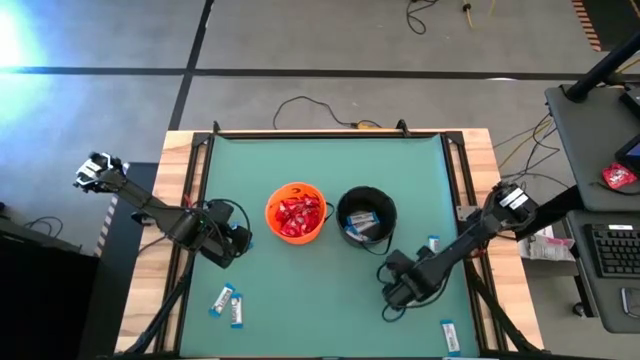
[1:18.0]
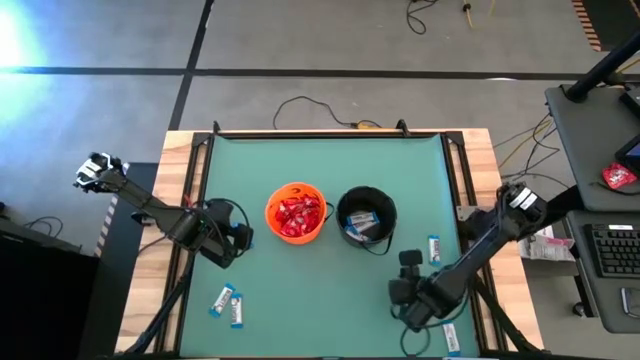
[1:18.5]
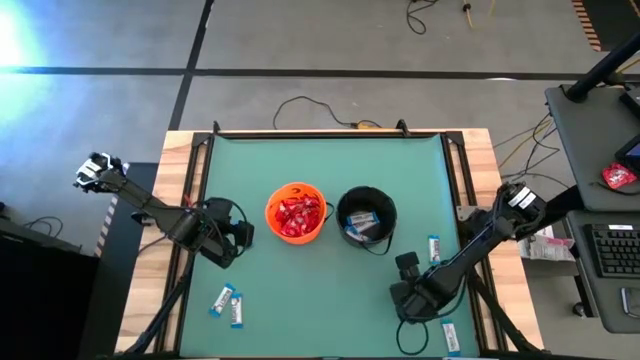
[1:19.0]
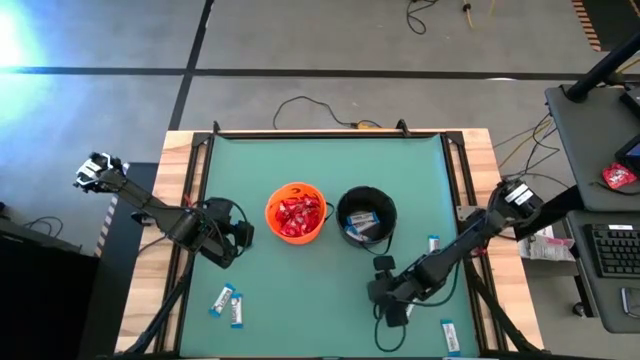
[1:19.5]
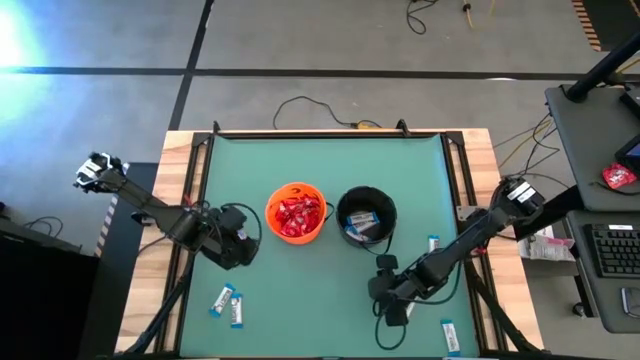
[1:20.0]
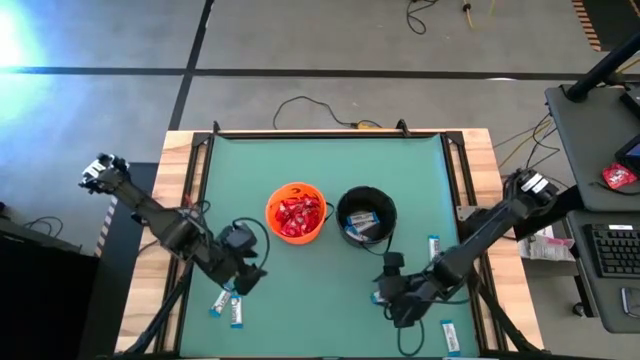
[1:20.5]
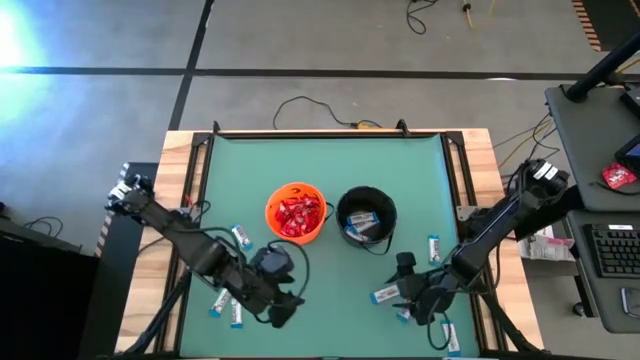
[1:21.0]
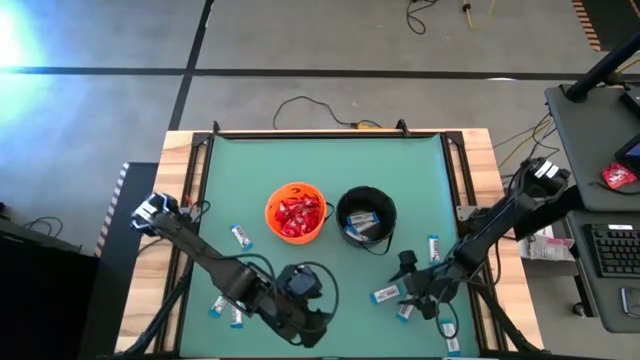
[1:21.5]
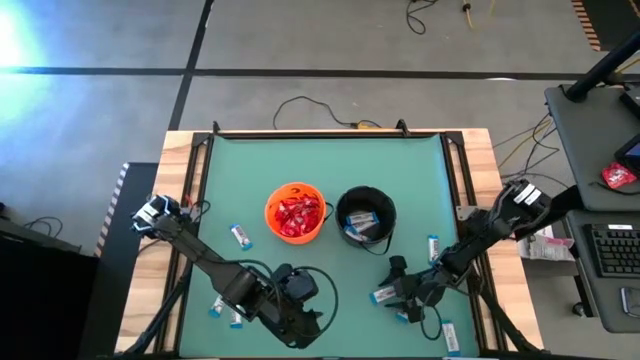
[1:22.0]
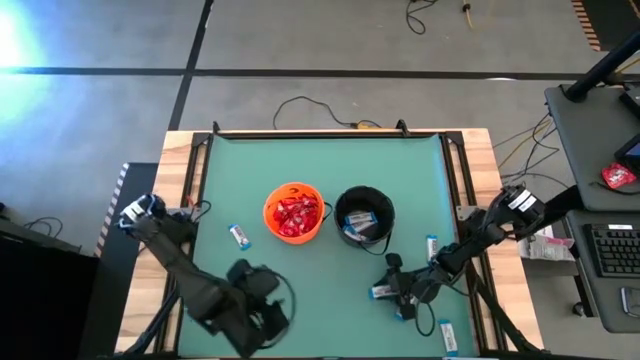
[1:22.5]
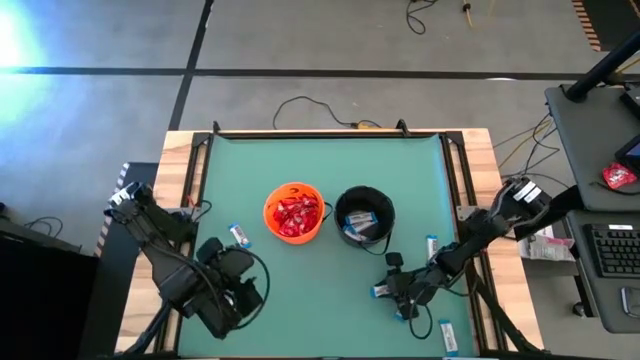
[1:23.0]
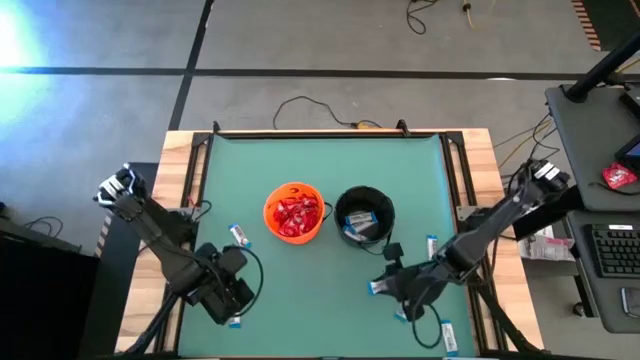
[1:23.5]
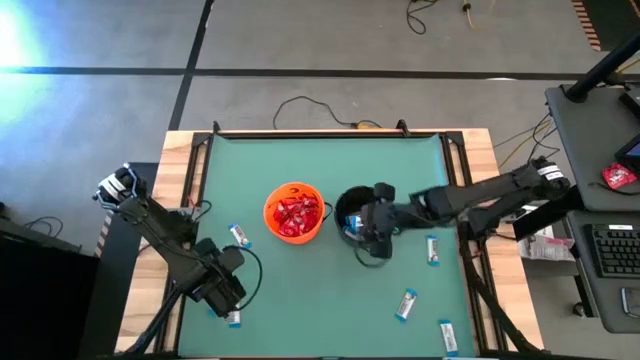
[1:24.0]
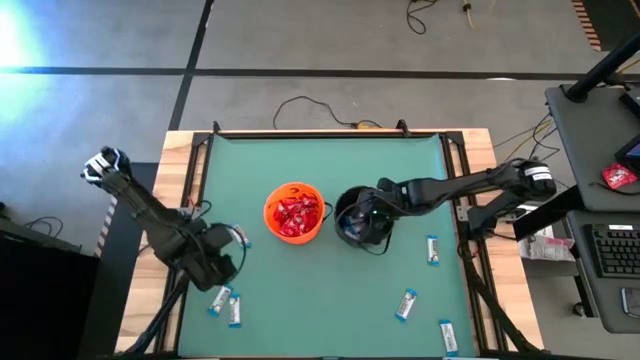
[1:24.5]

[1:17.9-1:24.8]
Task: Sort candy by brand, put in halloween buckets
Put the white chocolate into the black bucket

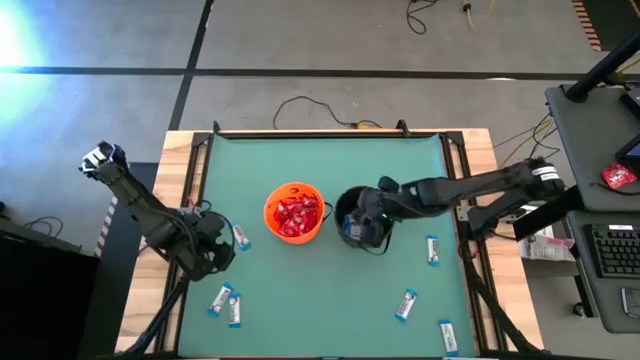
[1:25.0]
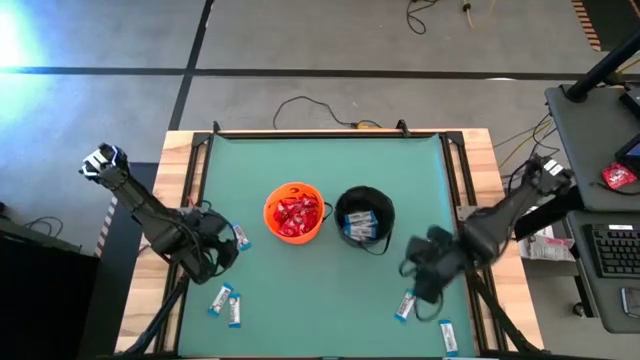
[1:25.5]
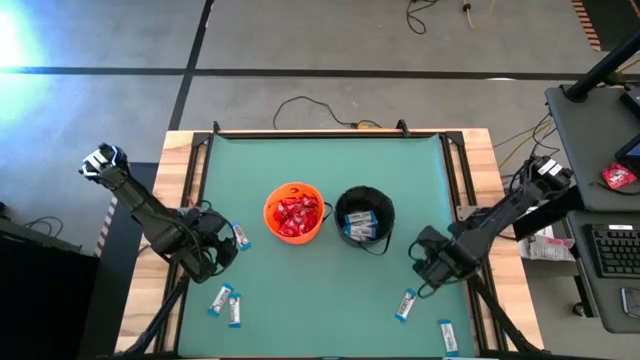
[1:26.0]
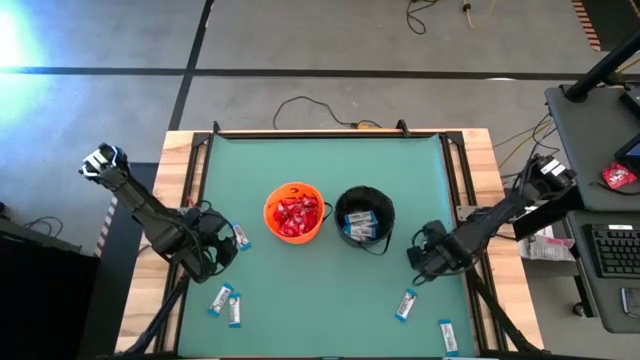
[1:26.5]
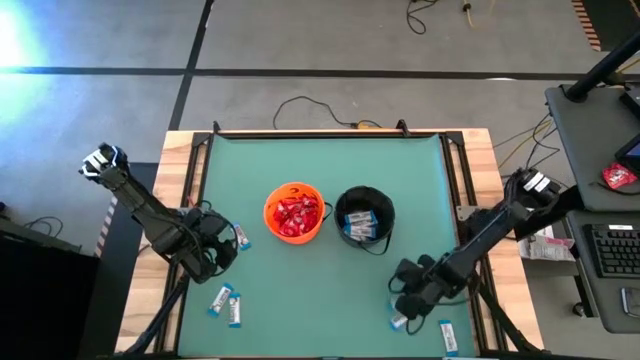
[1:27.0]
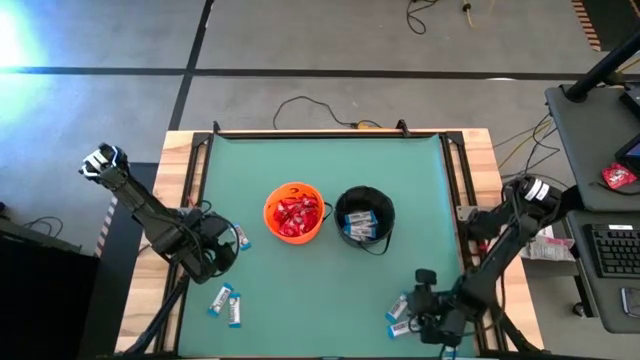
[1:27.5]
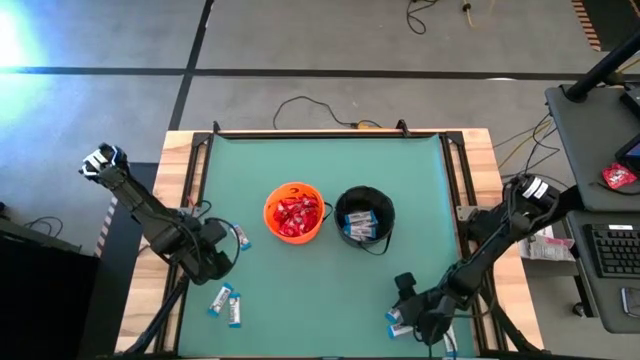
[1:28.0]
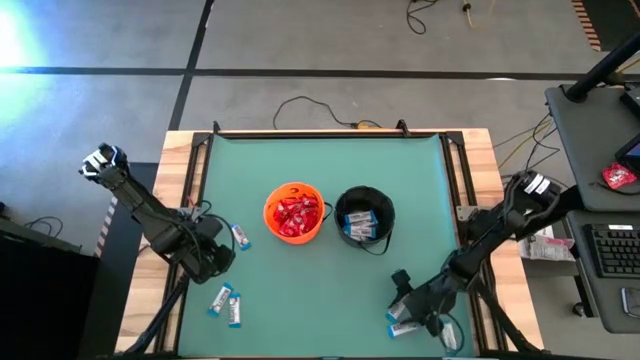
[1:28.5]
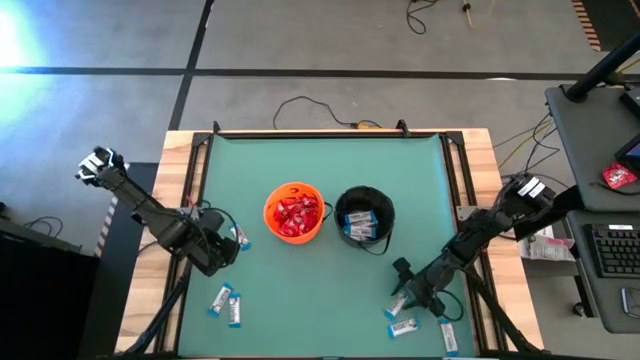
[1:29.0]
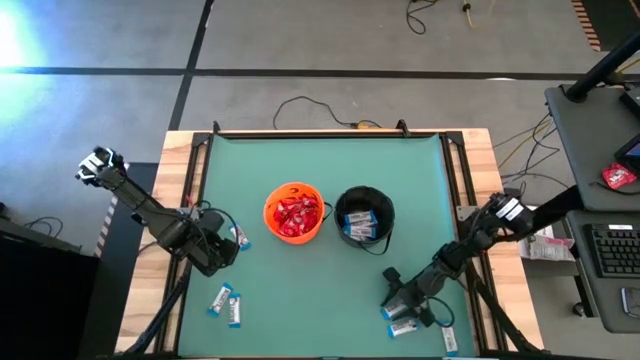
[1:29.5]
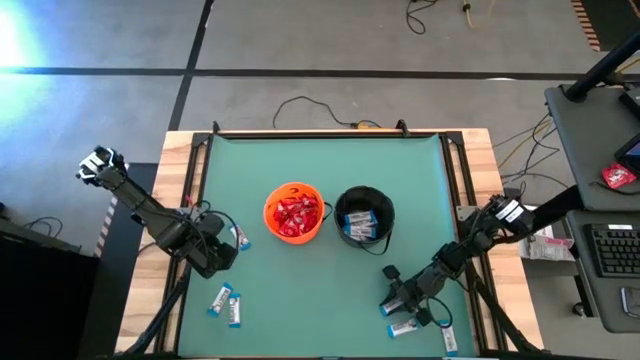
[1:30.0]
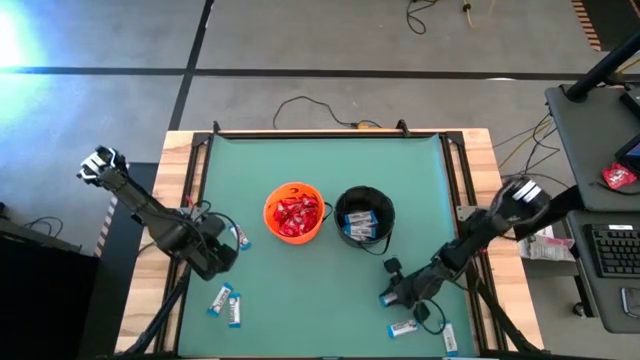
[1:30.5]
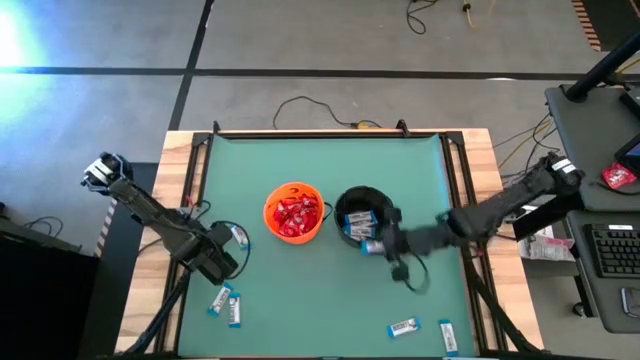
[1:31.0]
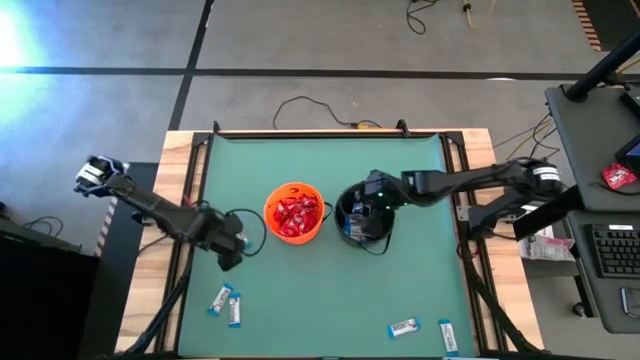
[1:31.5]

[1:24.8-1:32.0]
Put the white chocolate into the black bucket

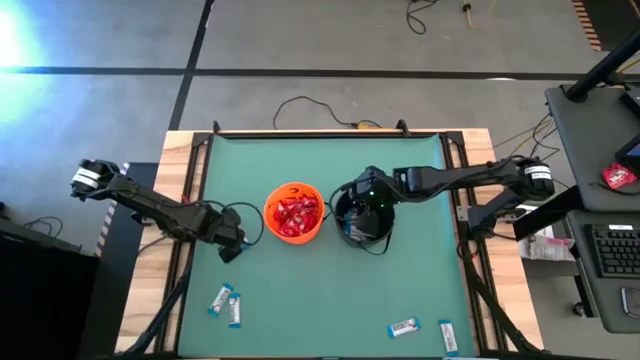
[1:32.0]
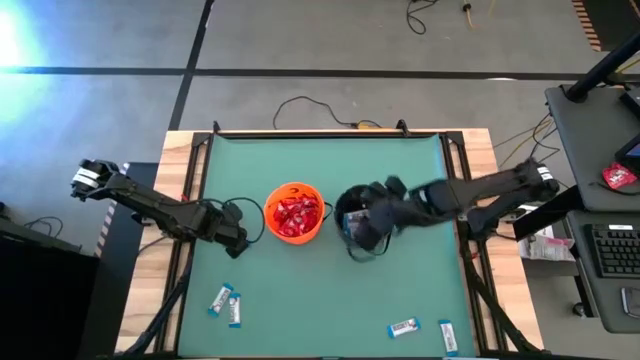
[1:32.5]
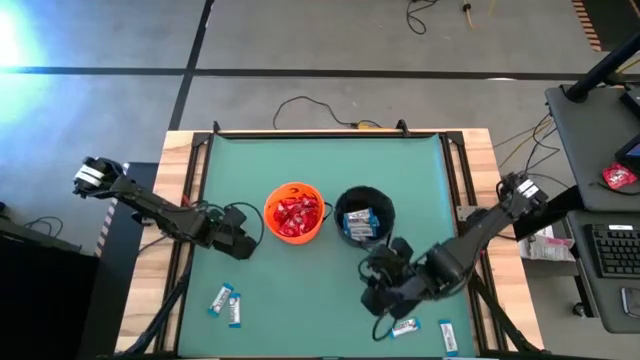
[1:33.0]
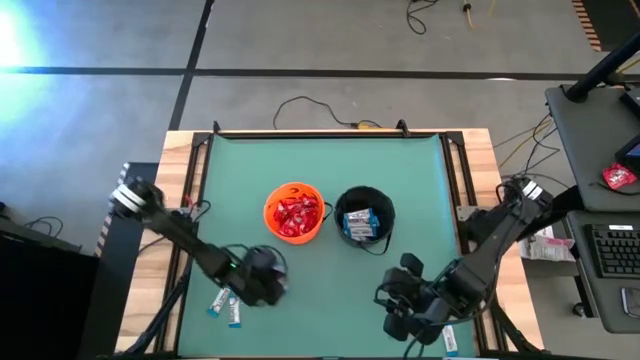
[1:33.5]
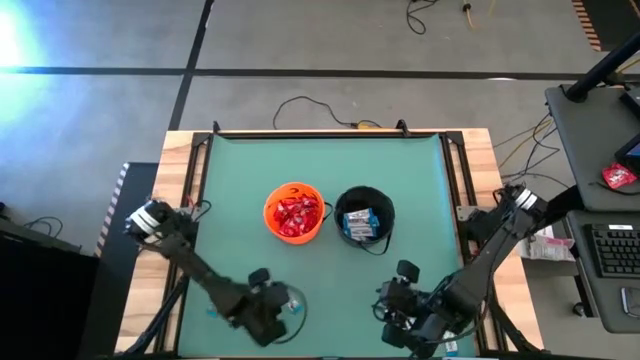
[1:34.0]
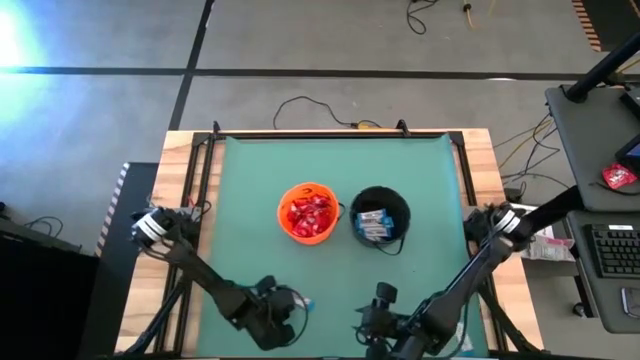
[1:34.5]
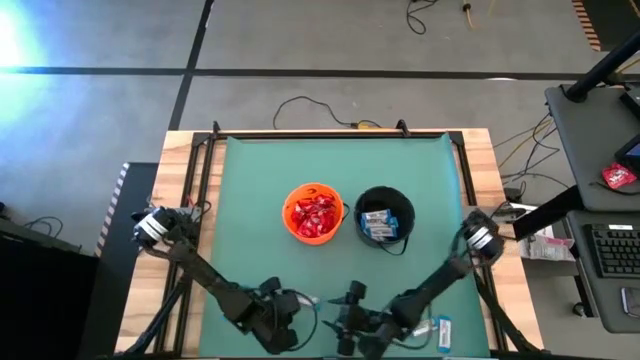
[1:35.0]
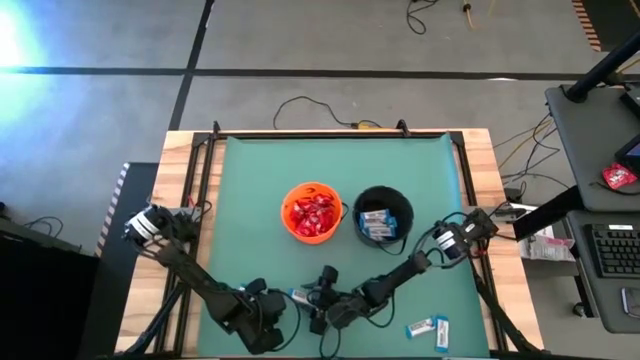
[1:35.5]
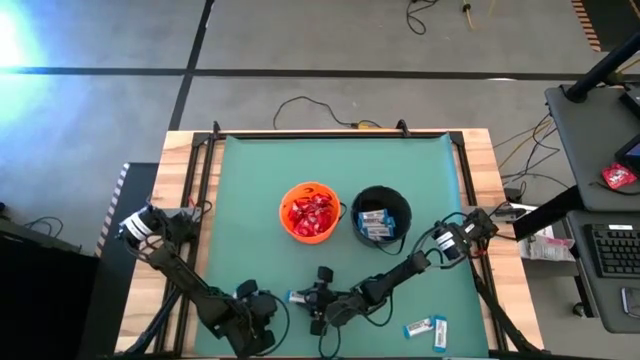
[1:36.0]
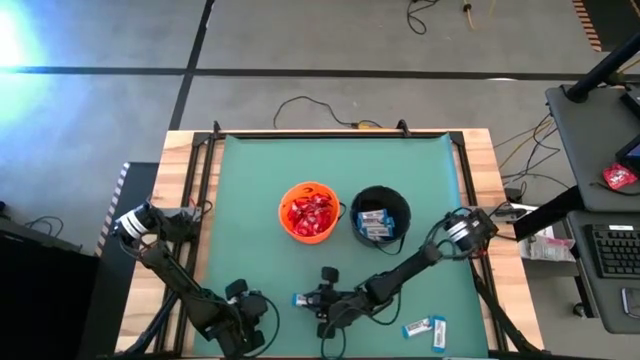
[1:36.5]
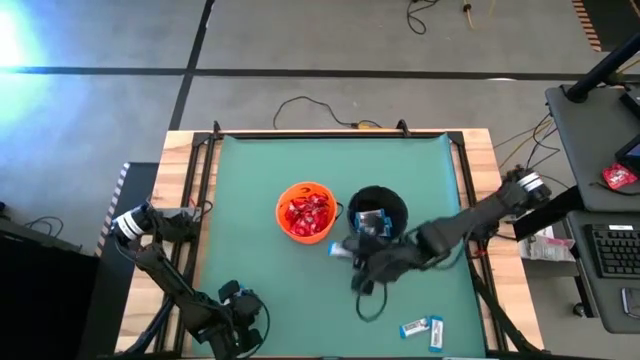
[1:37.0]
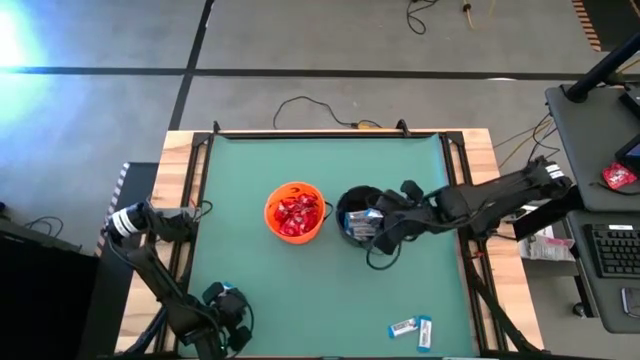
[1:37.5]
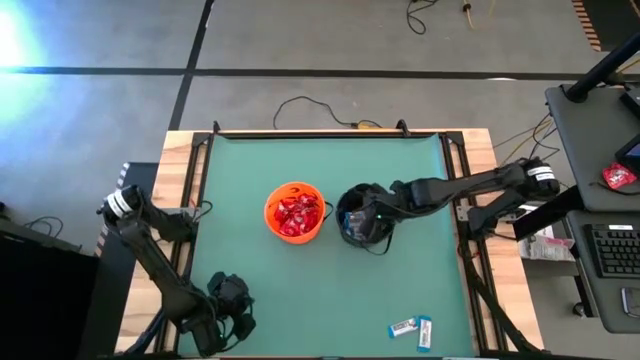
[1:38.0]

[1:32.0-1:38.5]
Put the white chocolate into the black bucket

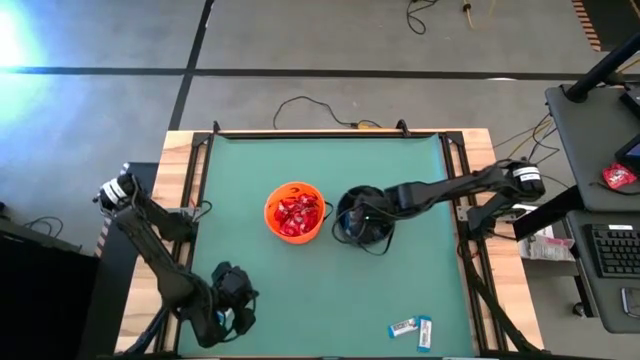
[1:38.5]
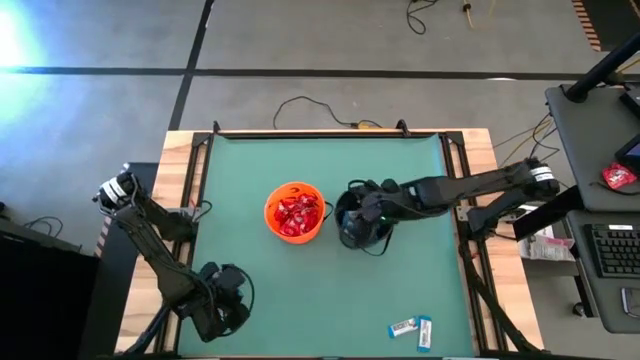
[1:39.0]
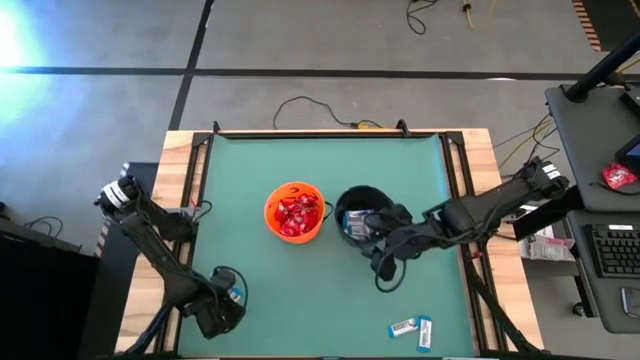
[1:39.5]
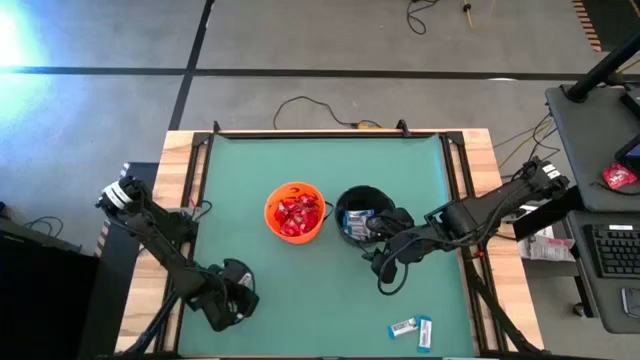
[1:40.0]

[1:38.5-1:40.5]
Adjust the white chocolate on the table

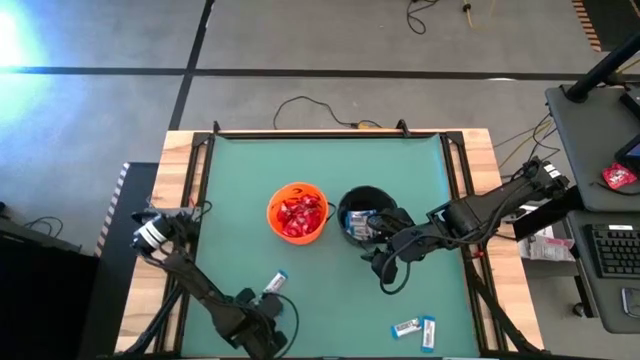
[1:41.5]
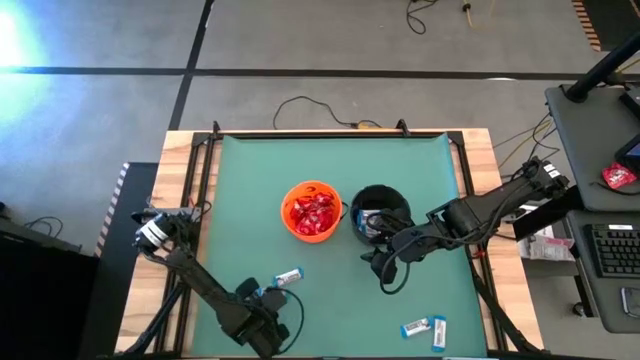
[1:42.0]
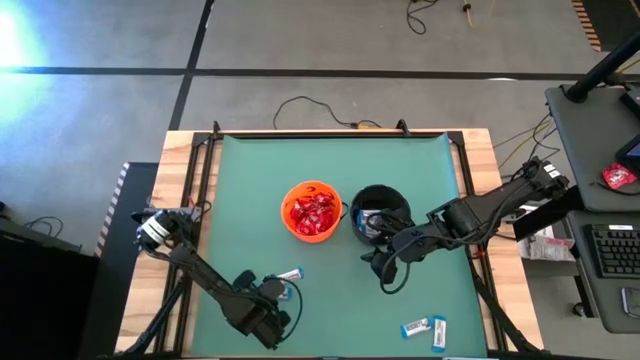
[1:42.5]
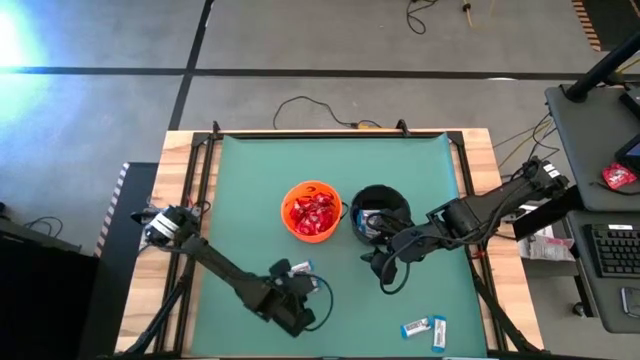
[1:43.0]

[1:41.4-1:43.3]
Adjust the white chocolate on the table
